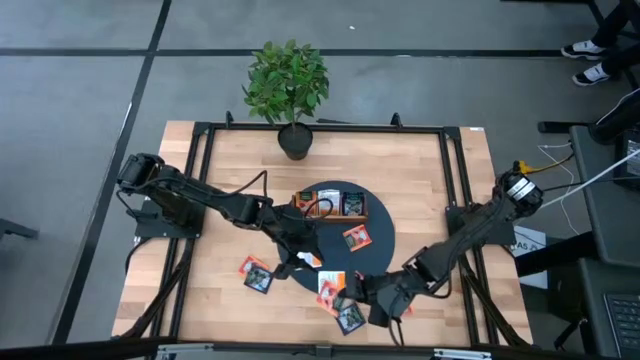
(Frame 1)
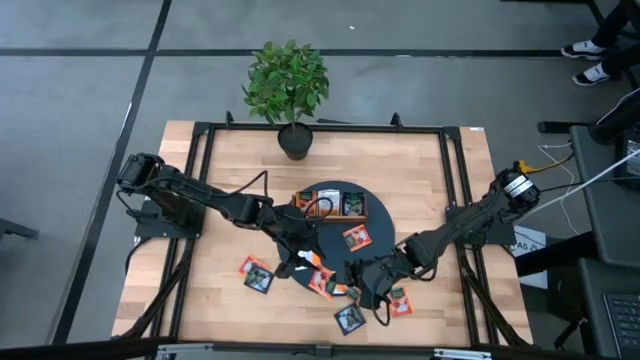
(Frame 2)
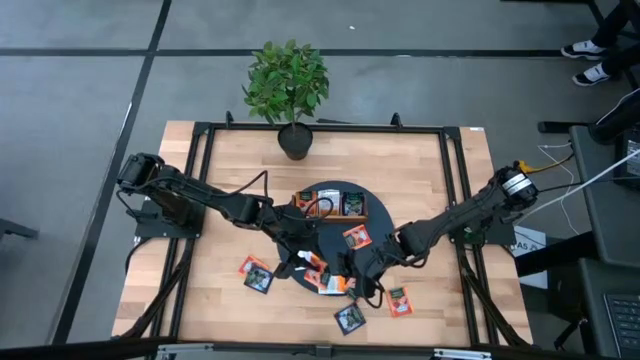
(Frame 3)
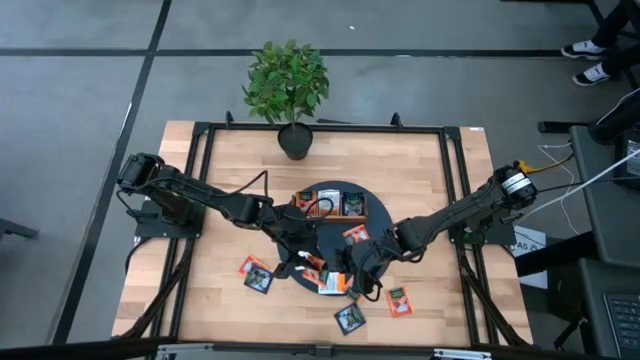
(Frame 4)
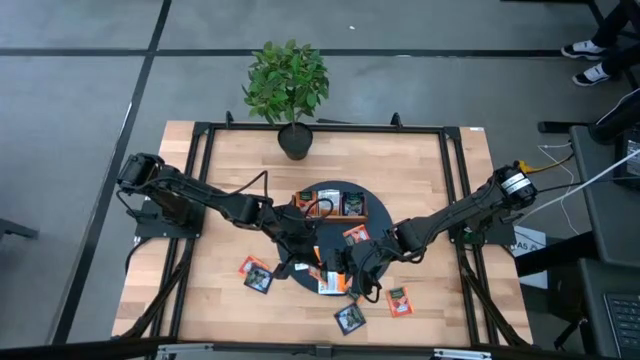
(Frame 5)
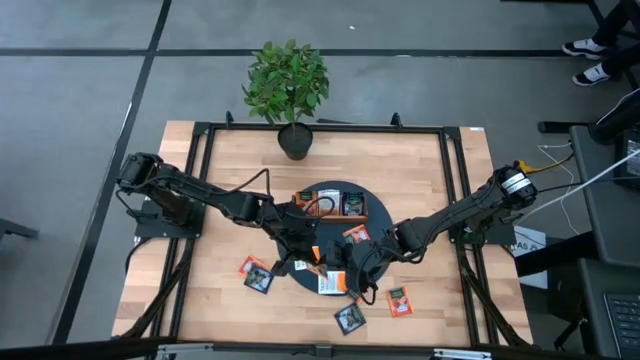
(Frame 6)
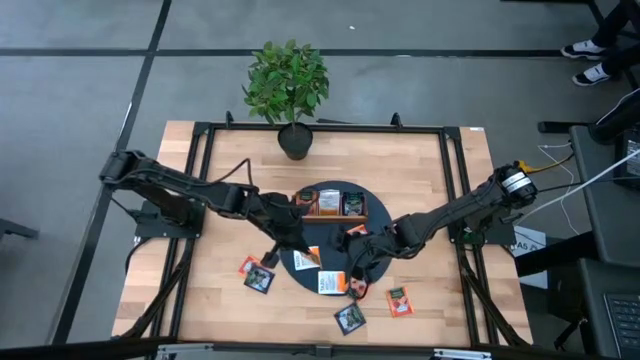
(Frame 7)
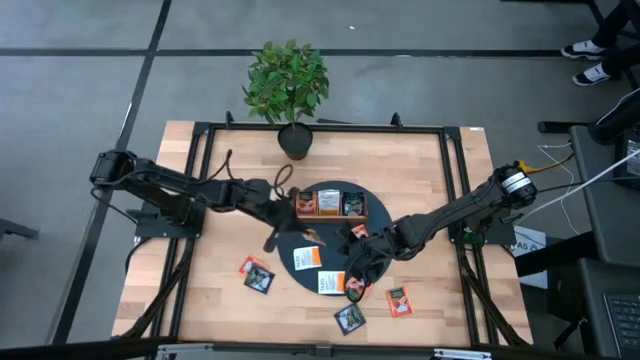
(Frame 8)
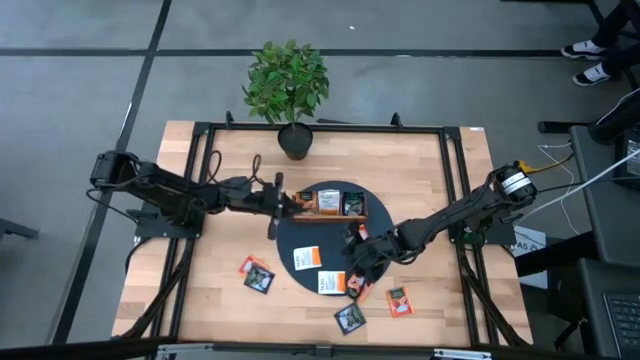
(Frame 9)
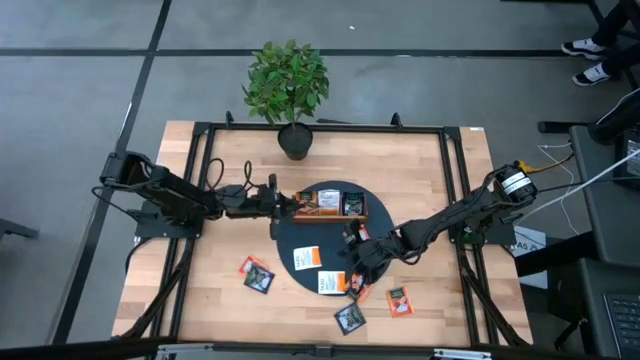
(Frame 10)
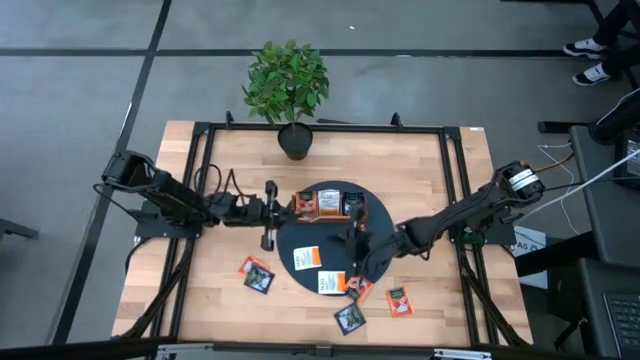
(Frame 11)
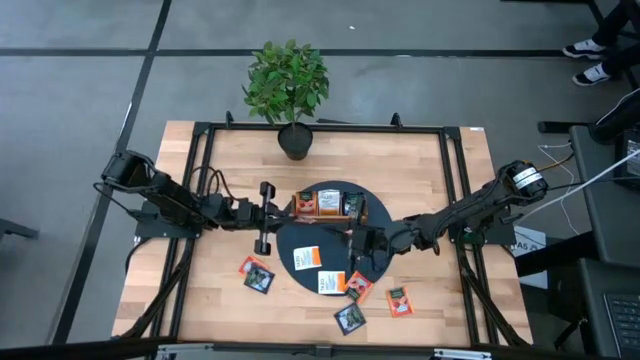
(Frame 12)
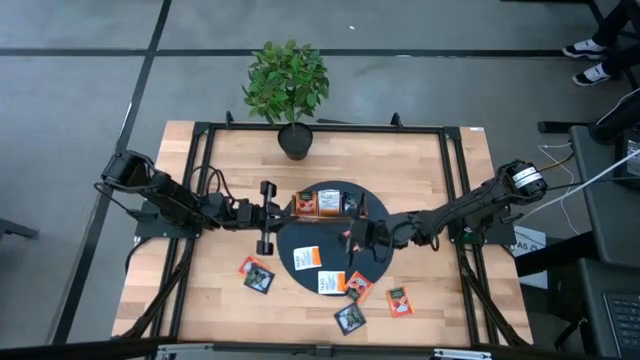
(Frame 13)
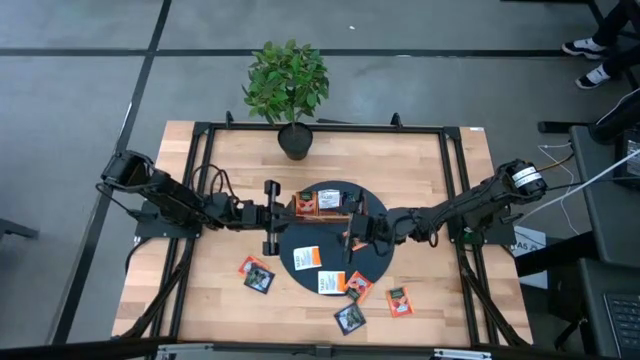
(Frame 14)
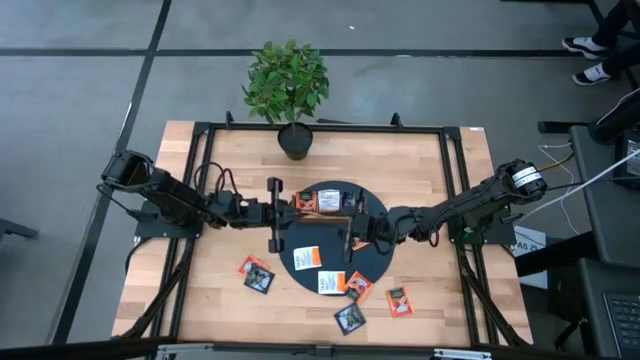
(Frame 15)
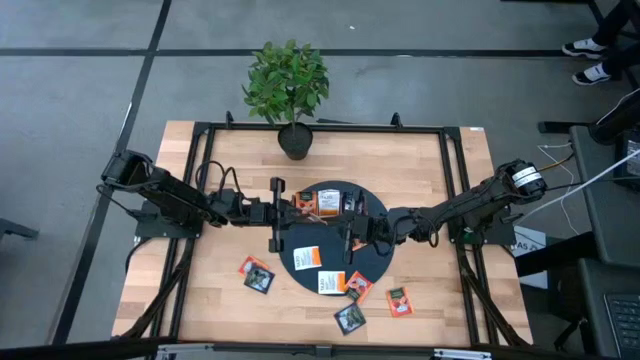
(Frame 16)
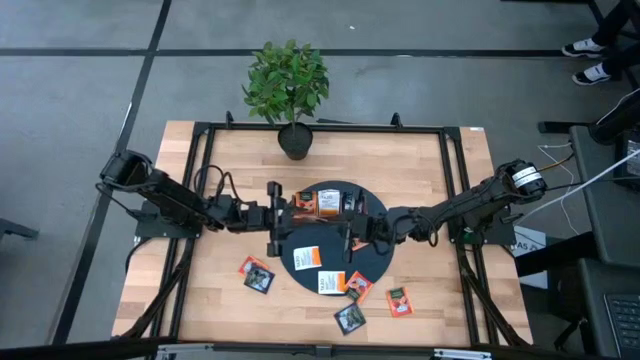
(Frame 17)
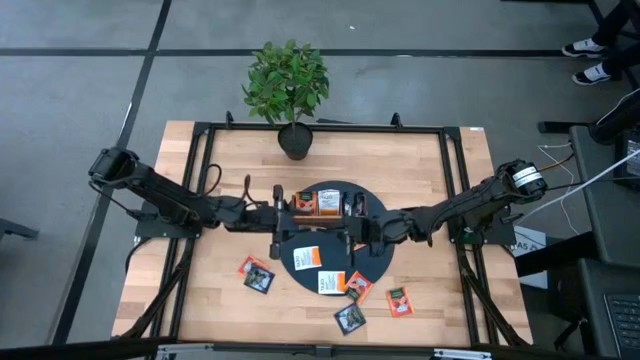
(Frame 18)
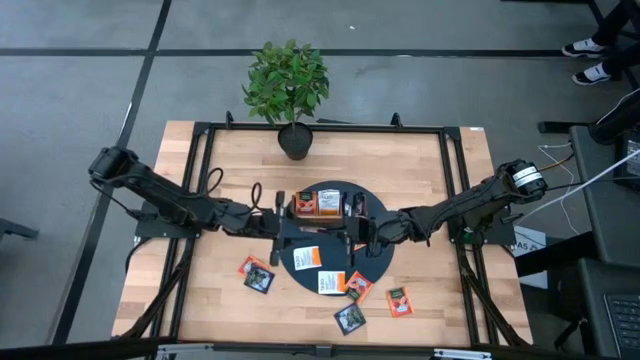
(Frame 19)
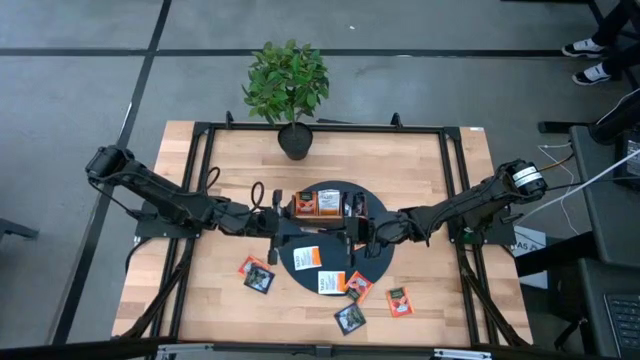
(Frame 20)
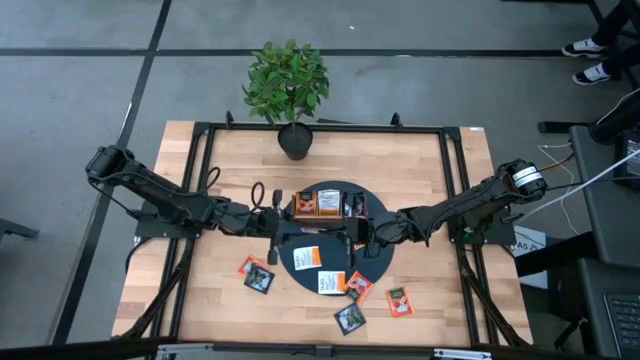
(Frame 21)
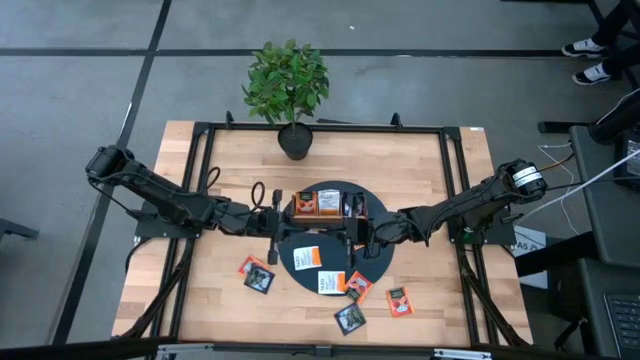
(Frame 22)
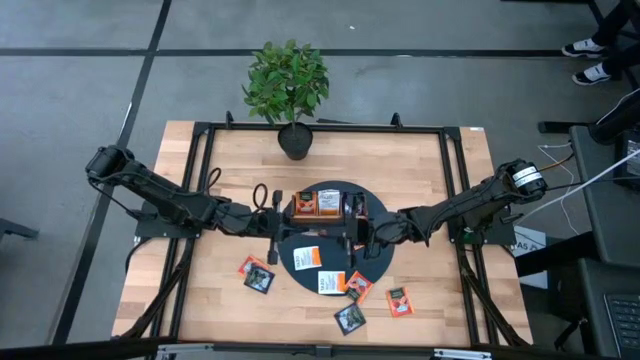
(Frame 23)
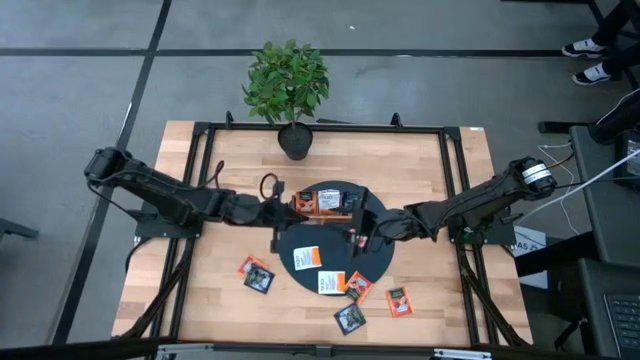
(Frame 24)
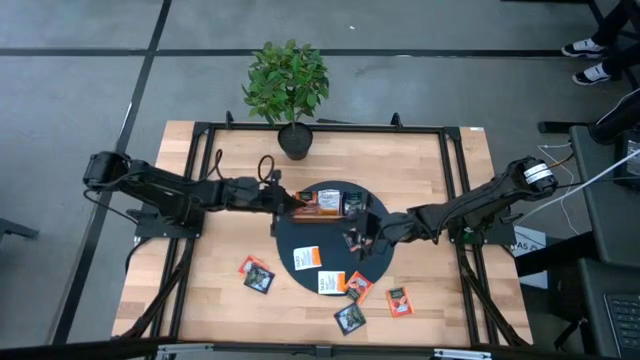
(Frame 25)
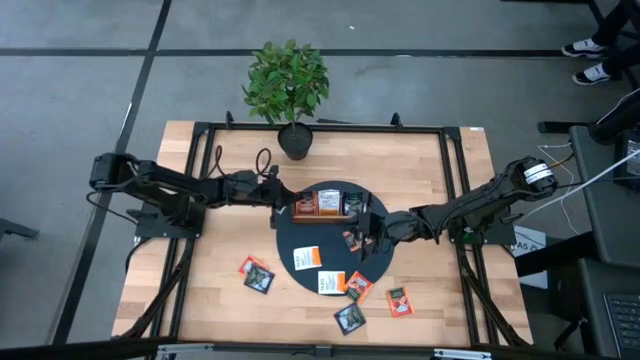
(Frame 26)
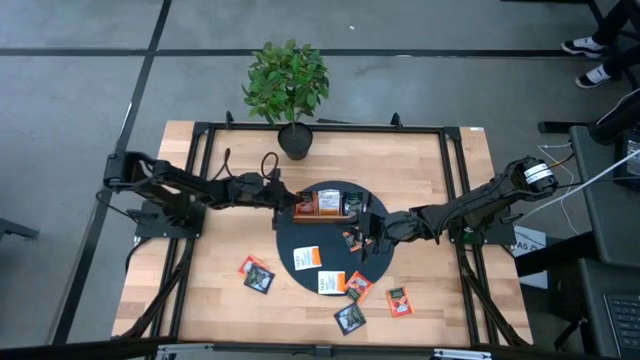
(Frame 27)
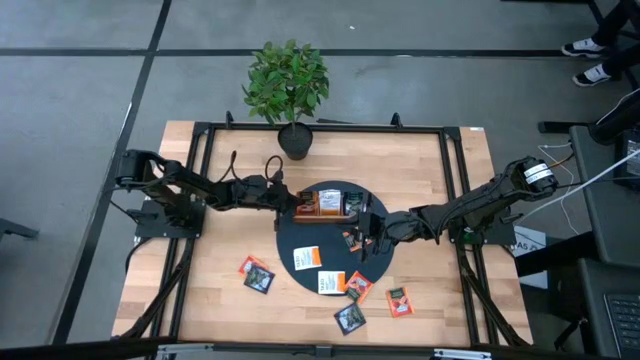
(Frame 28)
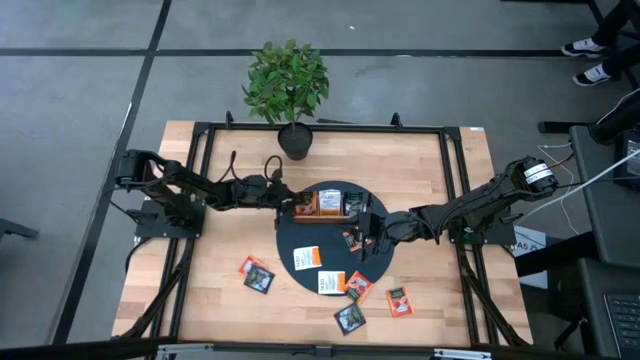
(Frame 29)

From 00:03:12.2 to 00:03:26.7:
Task: Pick & Place Tea
Put the orange tea bag into the left side of the wooden organizer

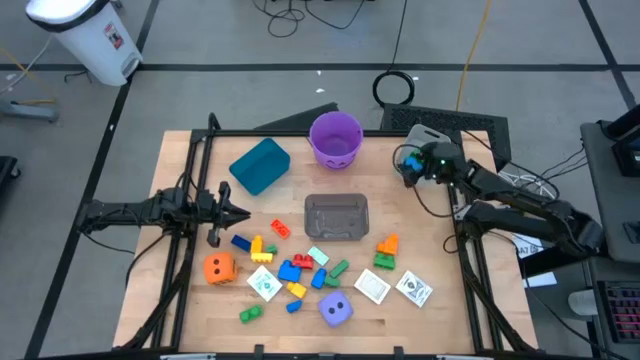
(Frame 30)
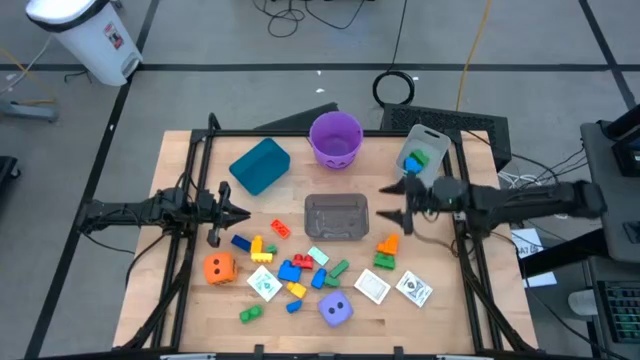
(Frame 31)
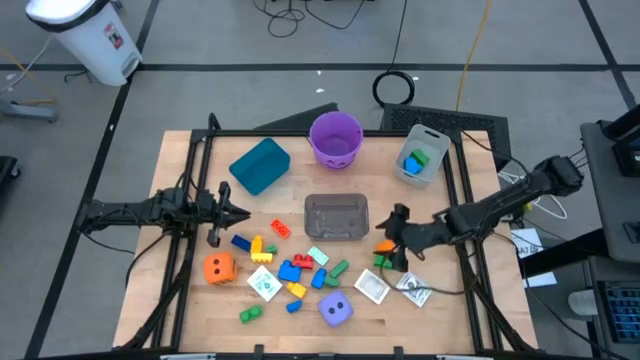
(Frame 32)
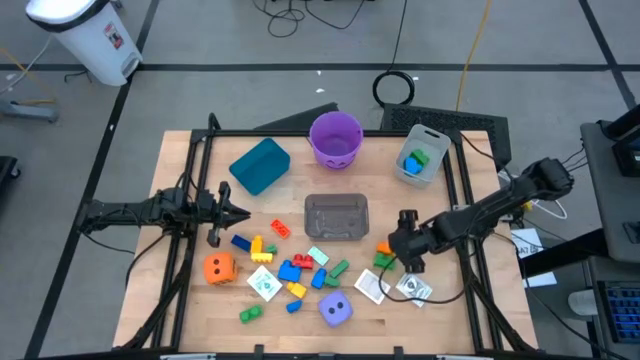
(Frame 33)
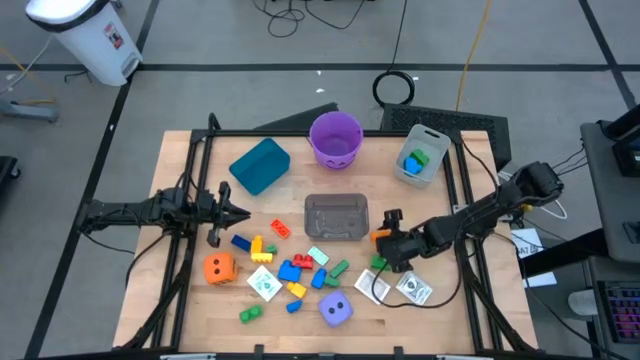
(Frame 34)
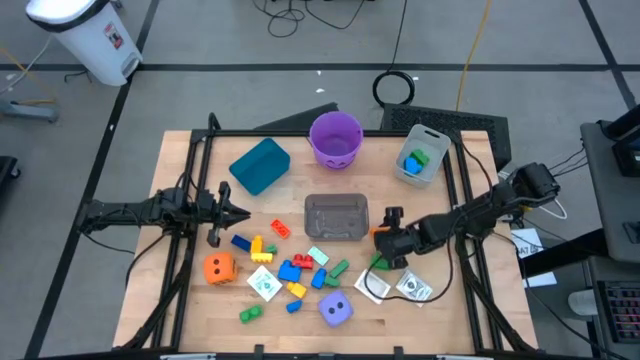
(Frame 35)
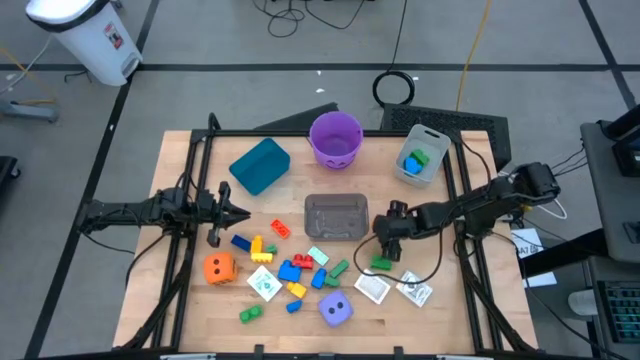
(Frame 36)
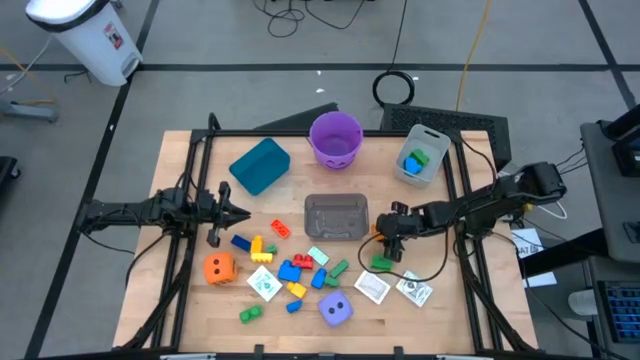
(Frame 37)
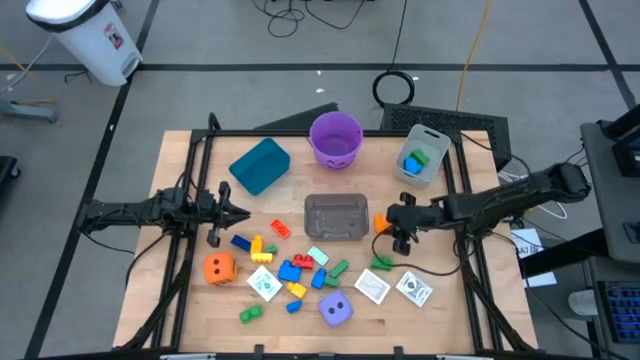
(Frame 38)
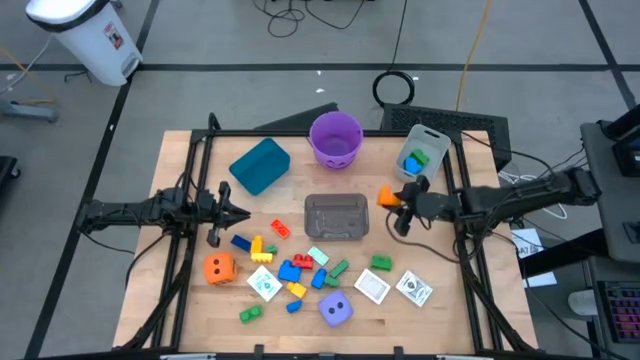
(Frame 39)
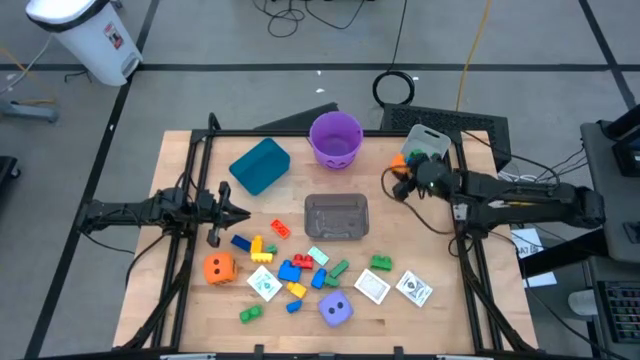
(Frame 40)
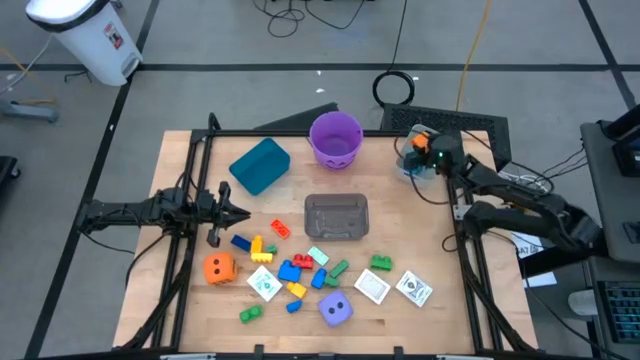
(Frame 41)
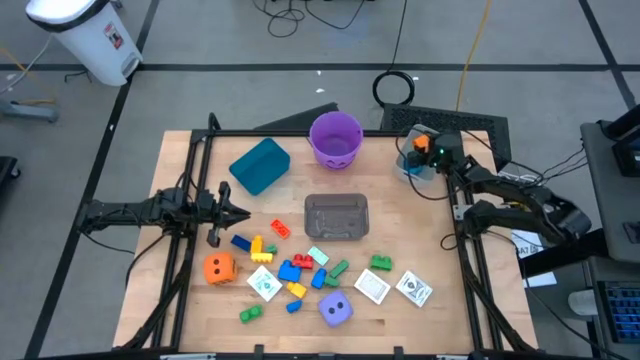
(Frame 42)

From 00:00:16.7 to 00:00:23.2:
Task: Pick & Place Toys
Put the orange game piece into the white bin
